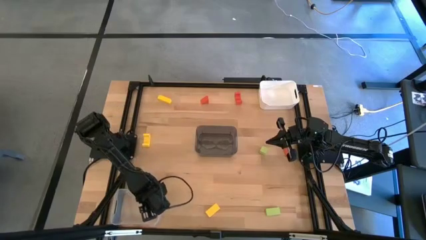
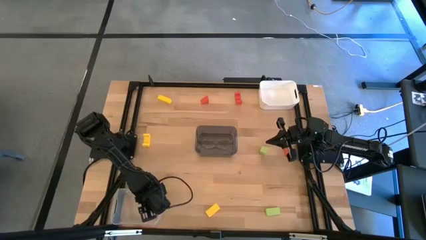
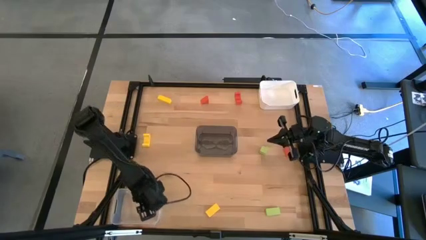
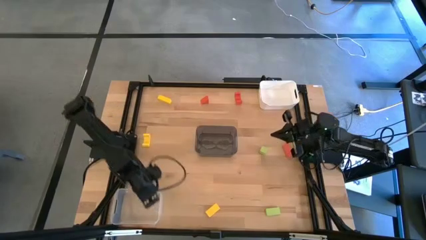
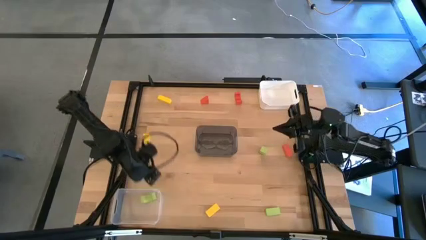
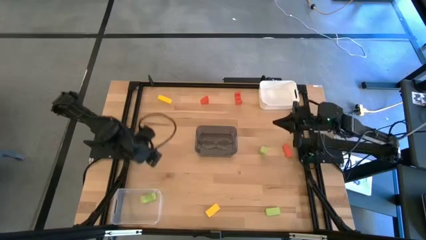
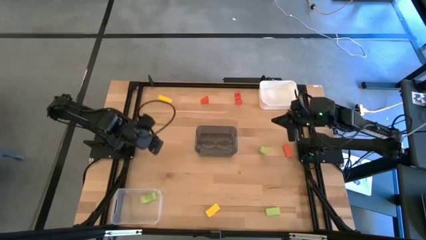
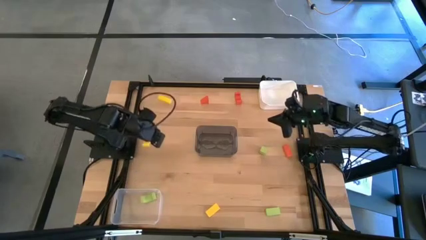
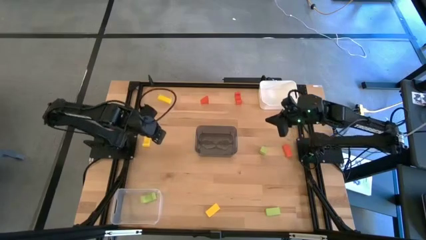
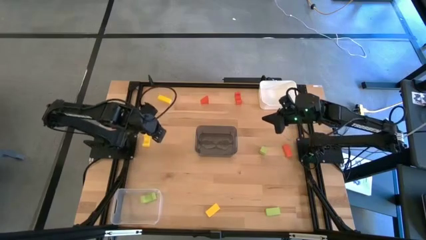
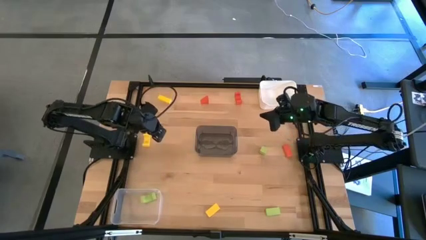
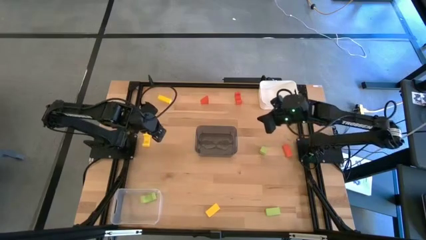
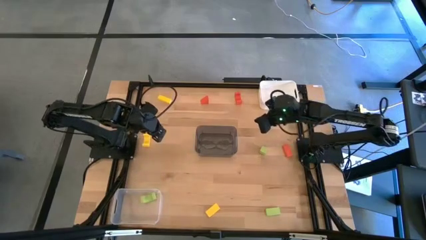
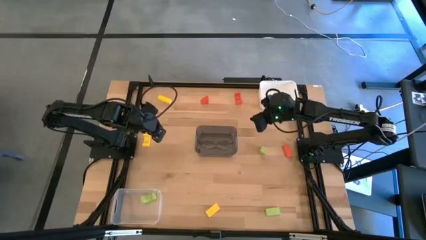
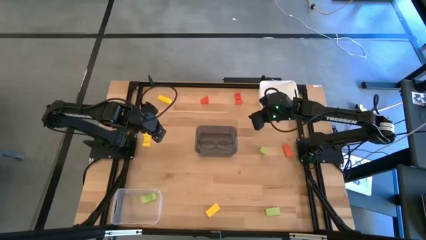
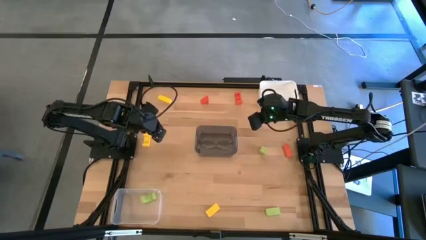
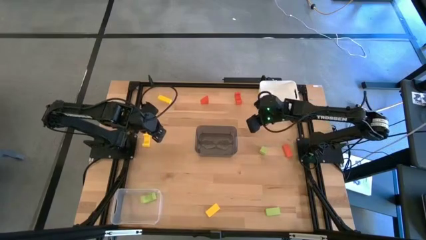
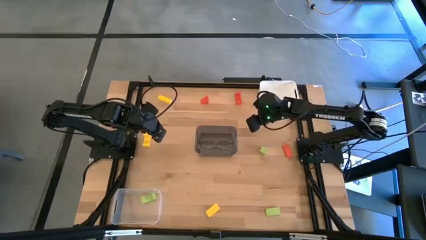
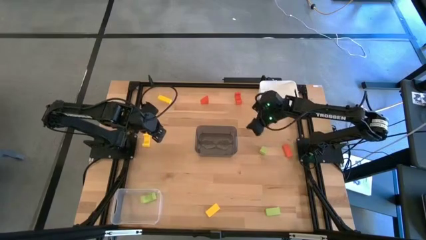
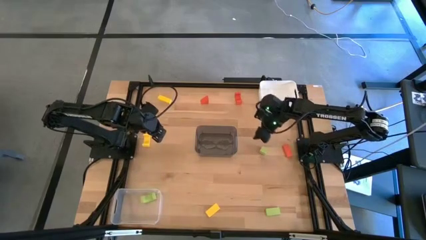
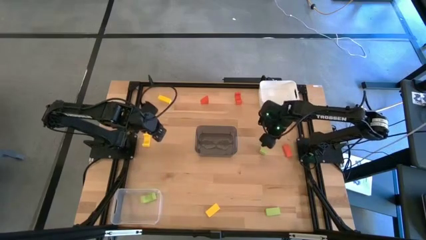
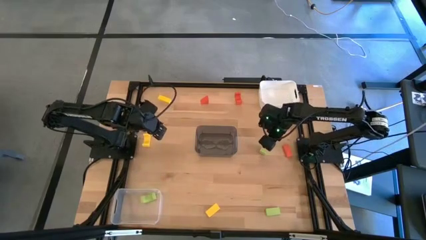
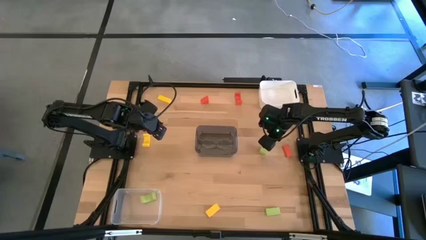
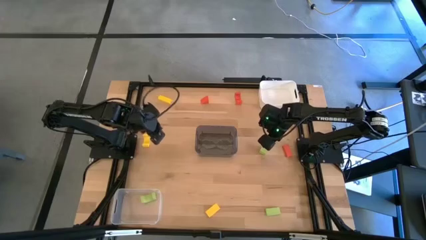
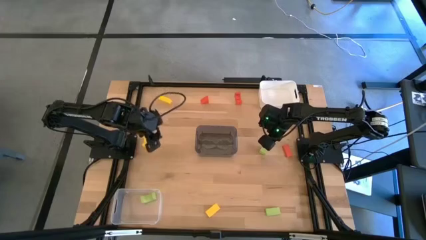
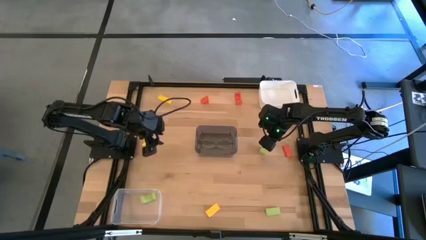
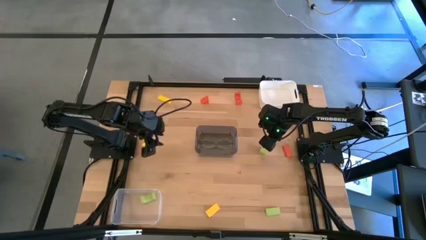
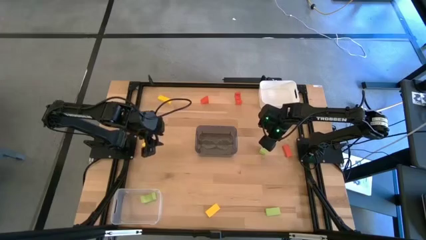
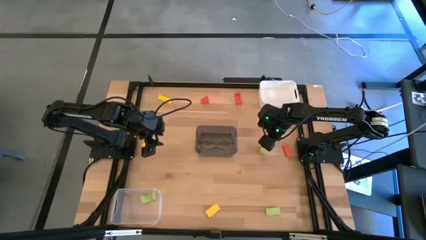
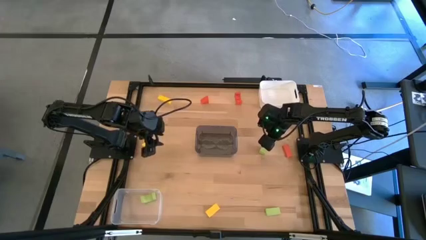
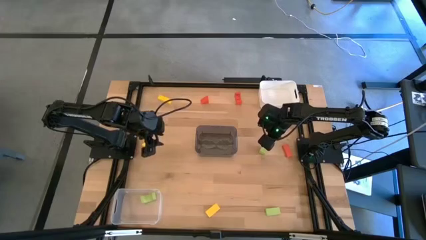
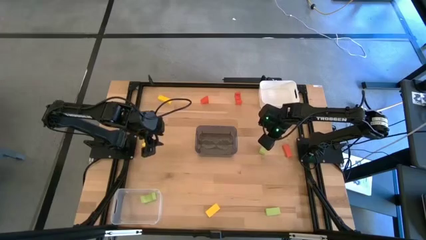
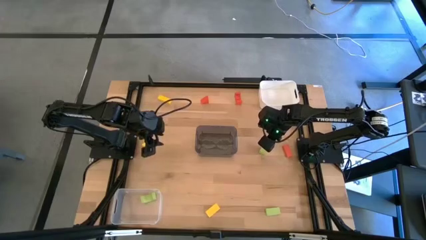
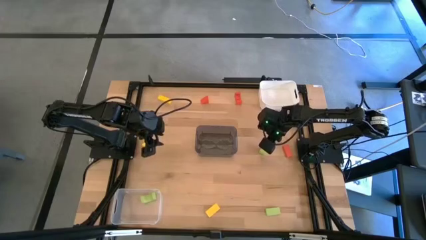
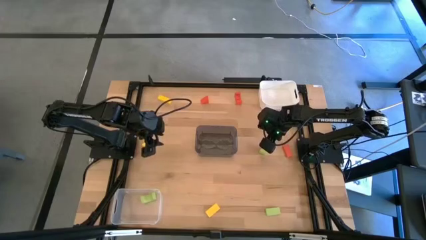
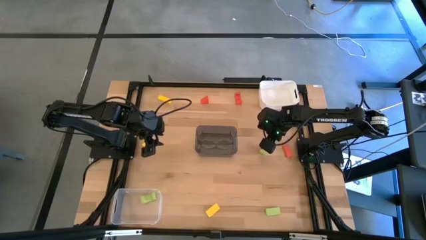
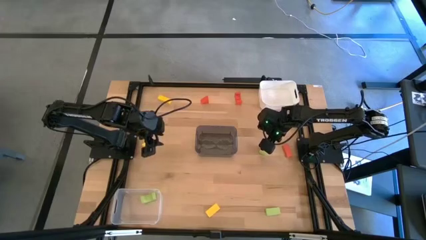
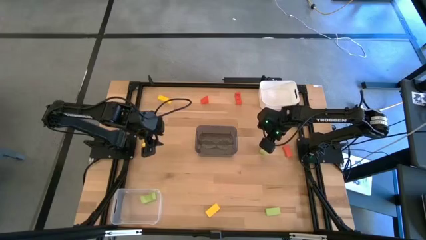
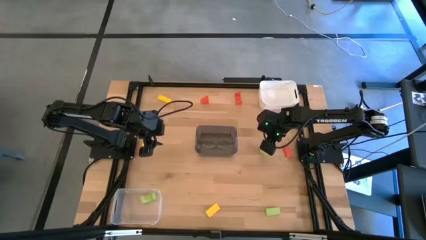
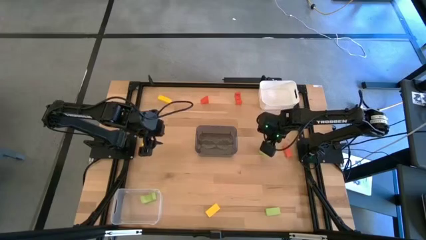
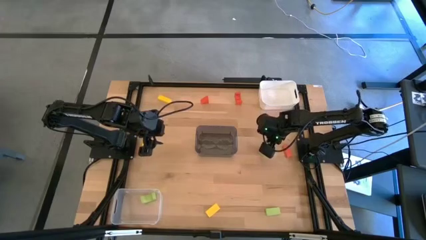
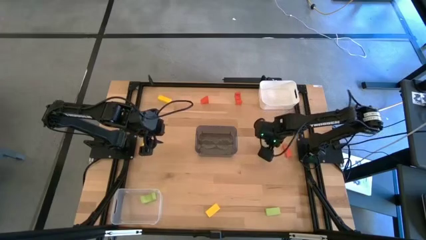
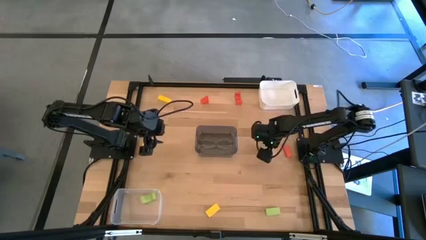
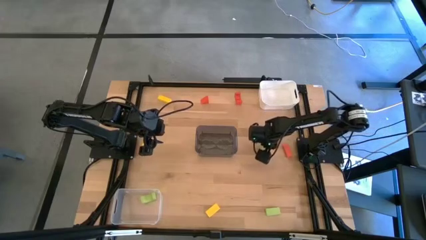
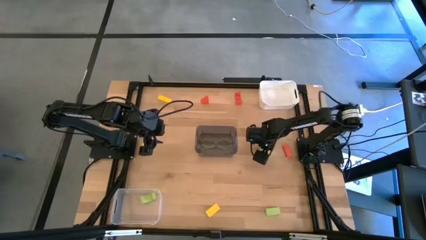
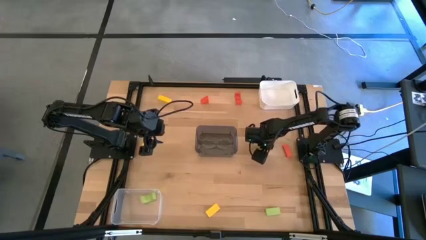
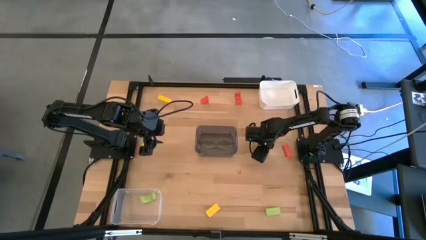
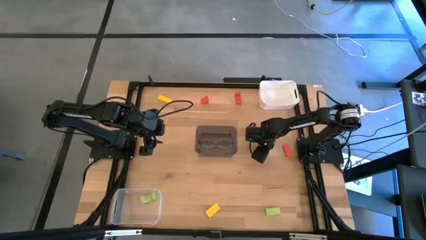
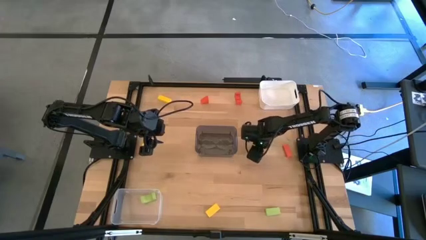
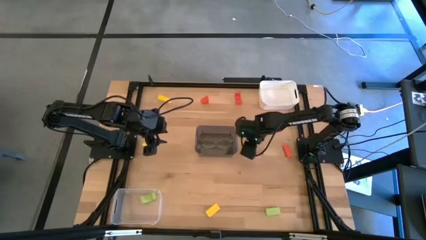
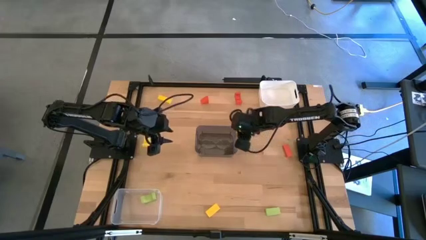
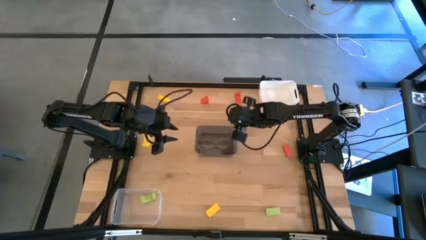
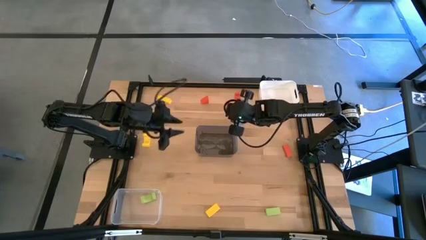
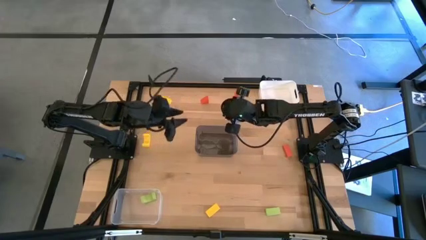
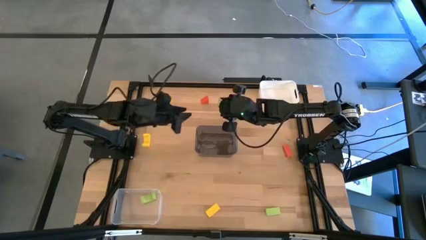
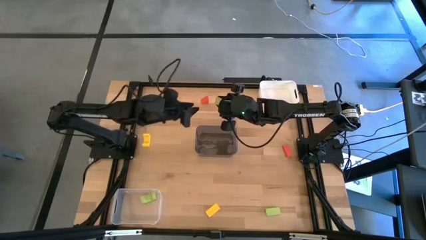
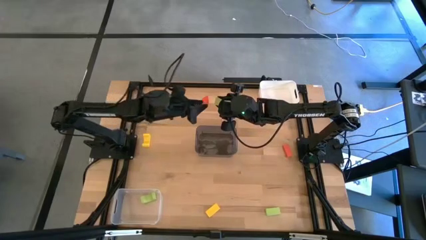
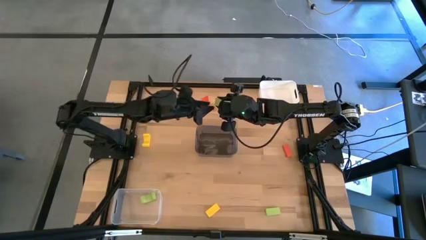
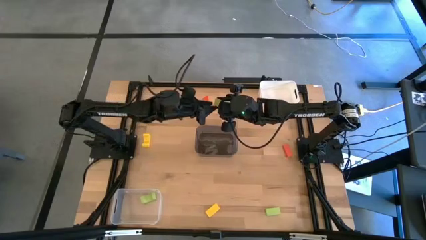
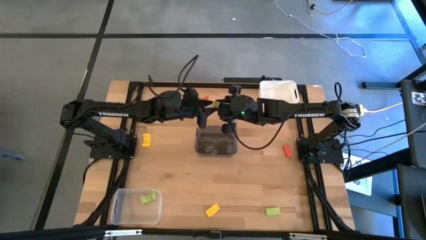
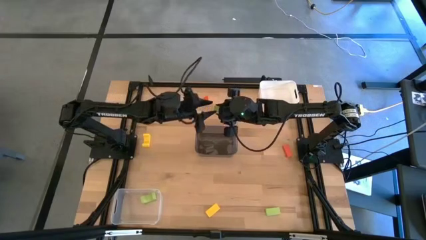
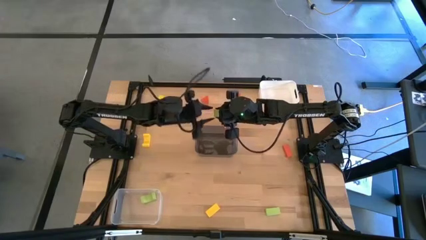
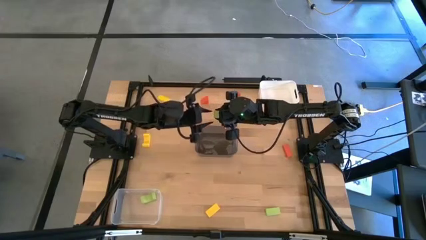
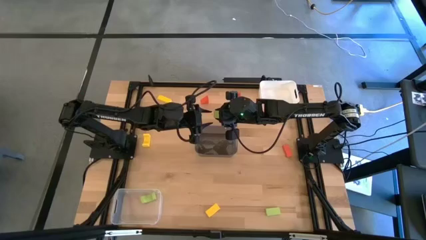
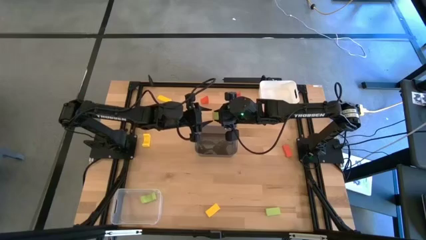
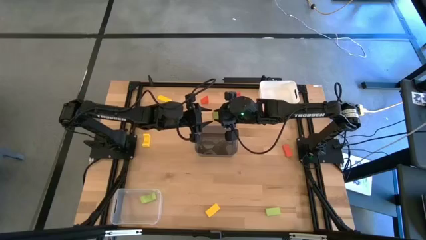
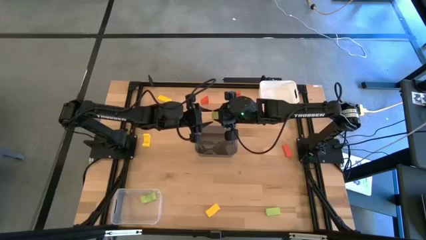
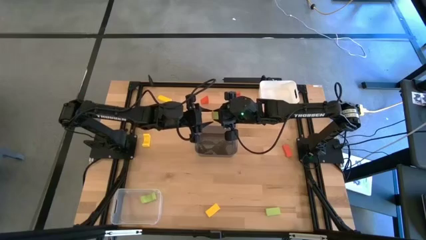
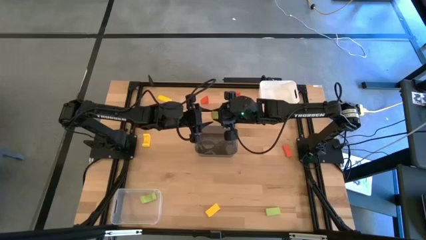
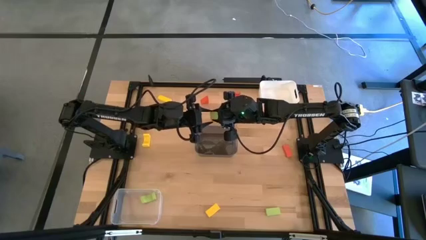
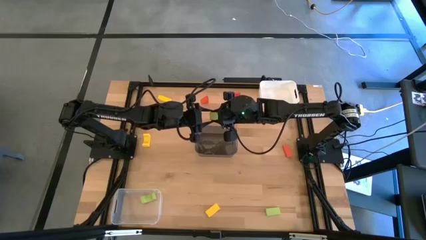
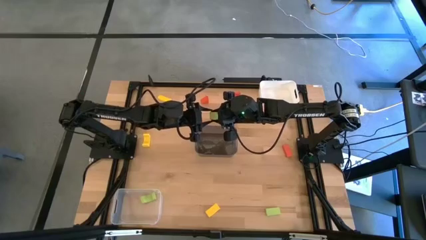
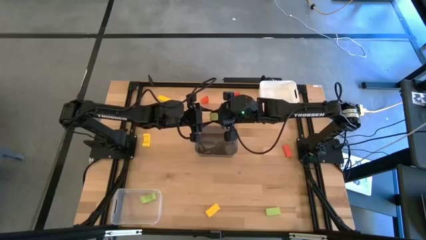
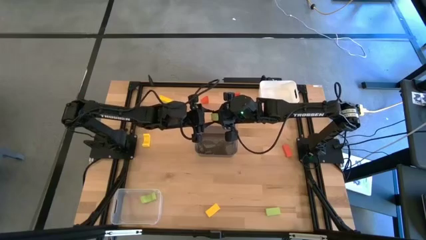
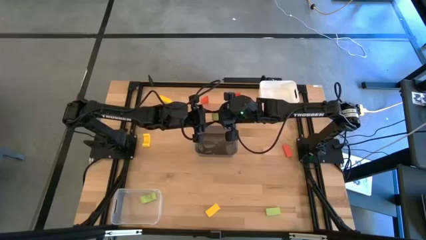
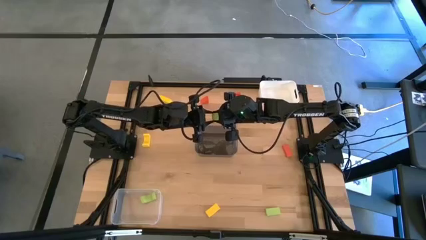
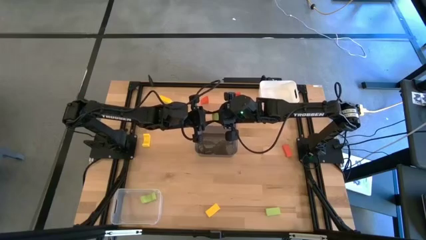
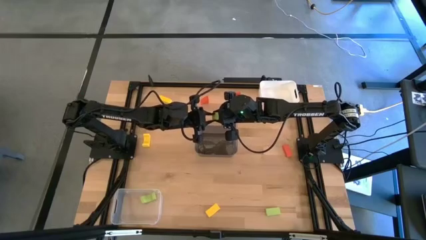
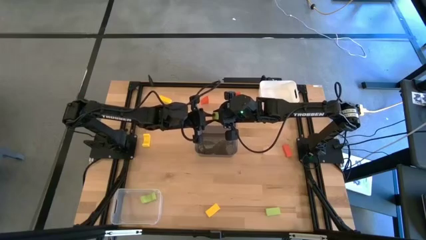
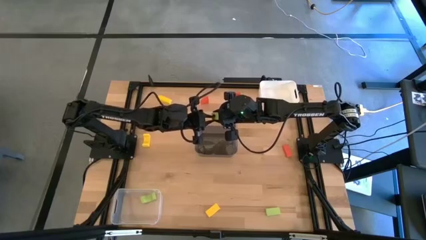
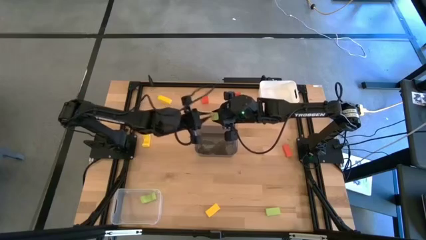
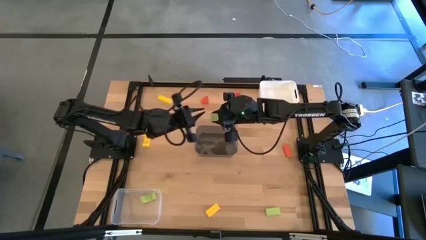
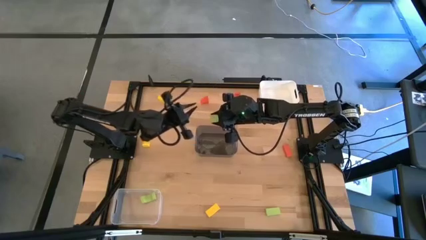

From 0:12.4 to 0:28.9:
Task: Sort & place blocks by color
Put the top green block into the transparent bin
